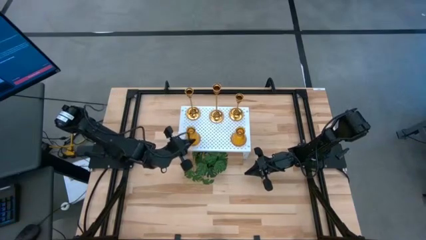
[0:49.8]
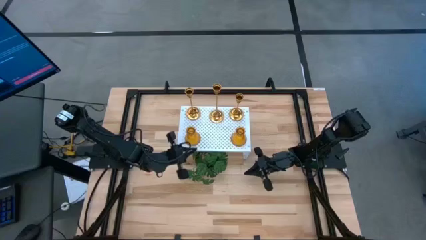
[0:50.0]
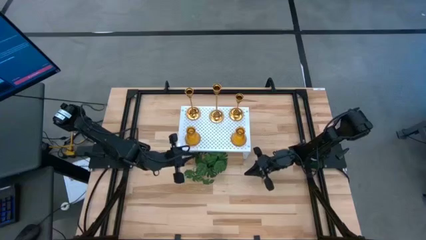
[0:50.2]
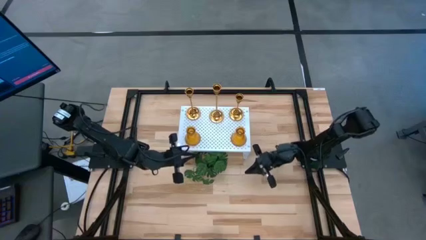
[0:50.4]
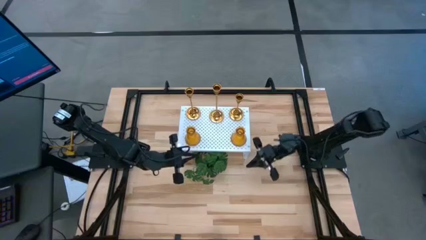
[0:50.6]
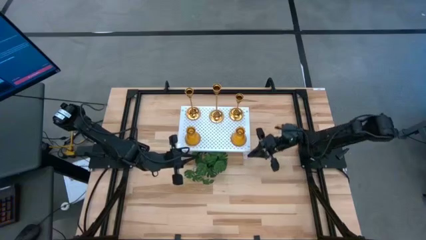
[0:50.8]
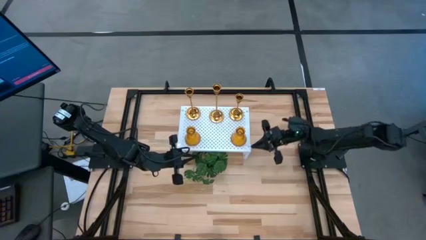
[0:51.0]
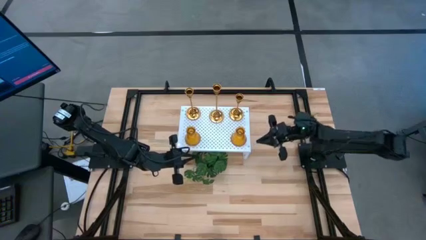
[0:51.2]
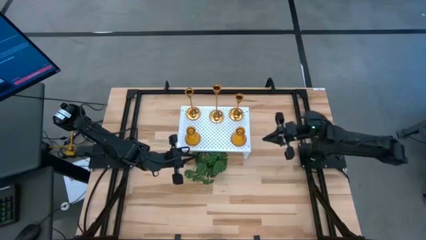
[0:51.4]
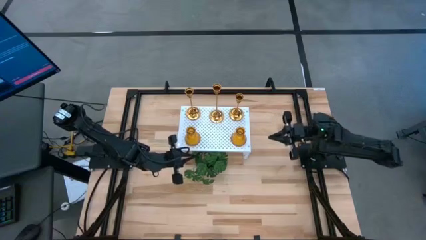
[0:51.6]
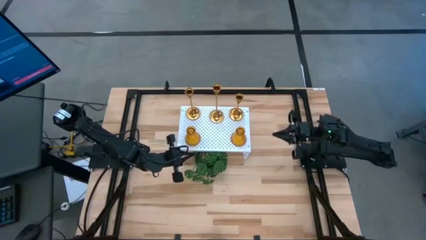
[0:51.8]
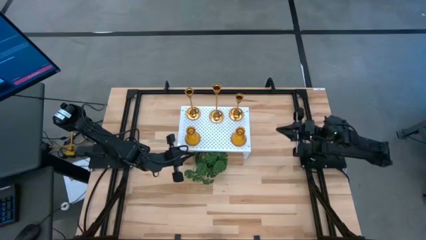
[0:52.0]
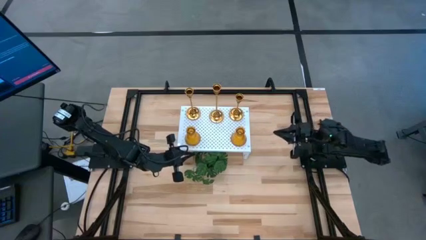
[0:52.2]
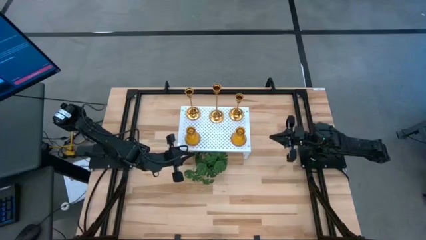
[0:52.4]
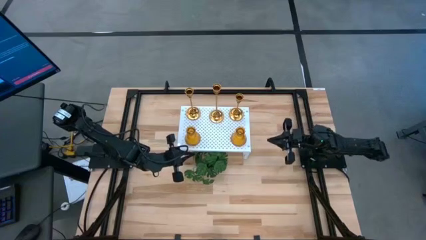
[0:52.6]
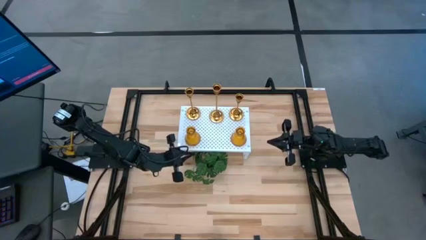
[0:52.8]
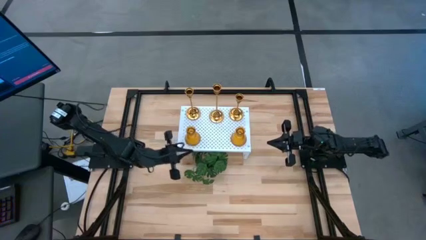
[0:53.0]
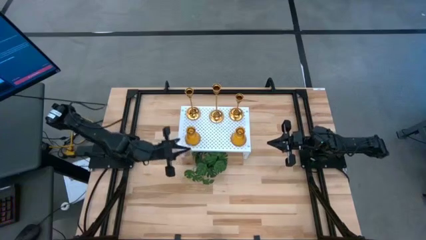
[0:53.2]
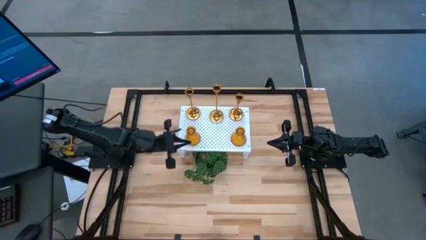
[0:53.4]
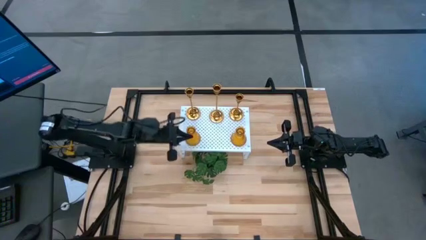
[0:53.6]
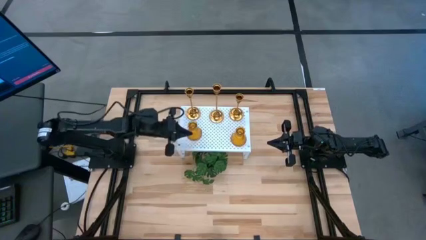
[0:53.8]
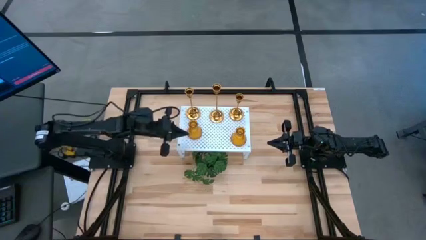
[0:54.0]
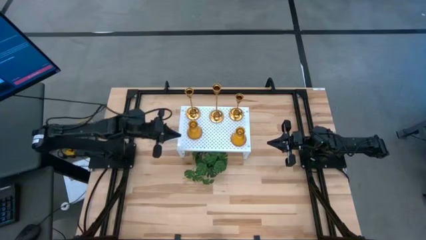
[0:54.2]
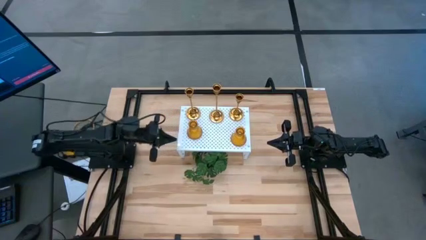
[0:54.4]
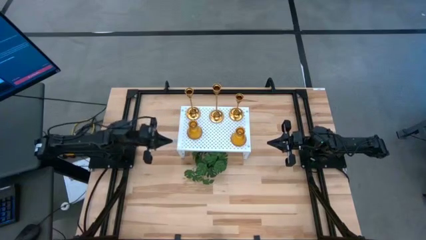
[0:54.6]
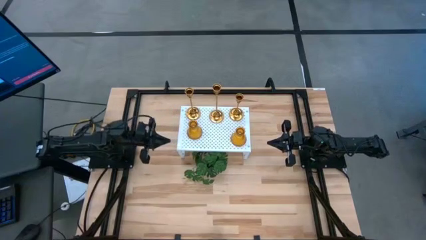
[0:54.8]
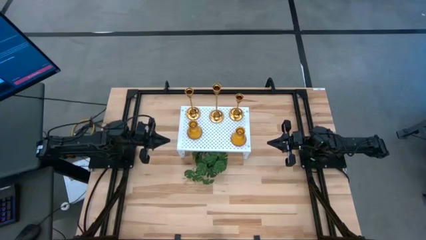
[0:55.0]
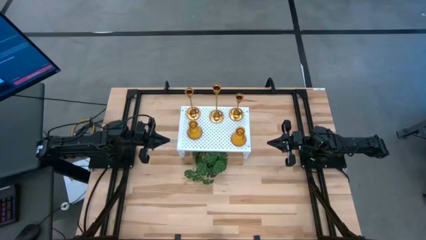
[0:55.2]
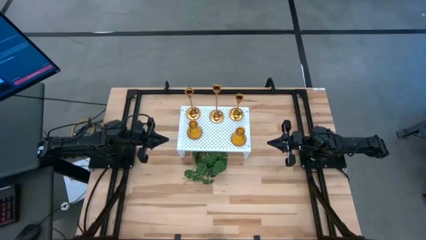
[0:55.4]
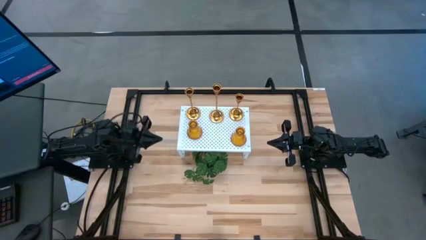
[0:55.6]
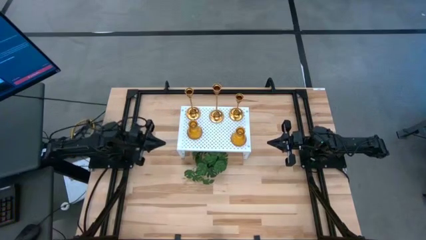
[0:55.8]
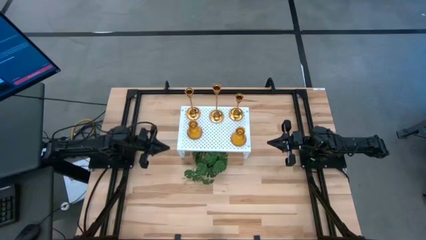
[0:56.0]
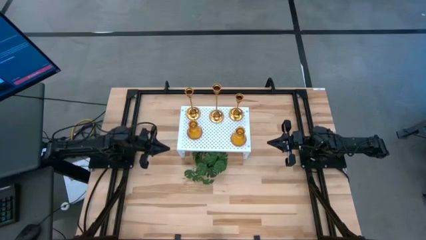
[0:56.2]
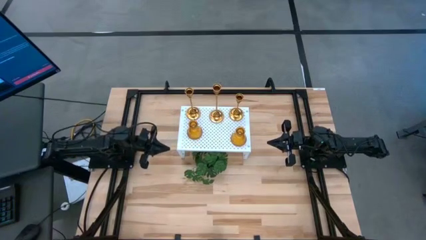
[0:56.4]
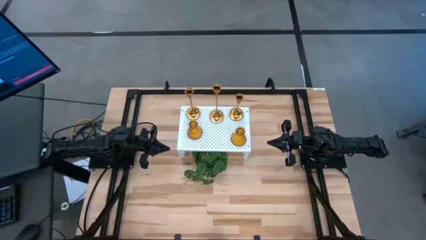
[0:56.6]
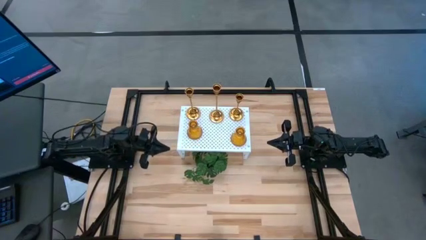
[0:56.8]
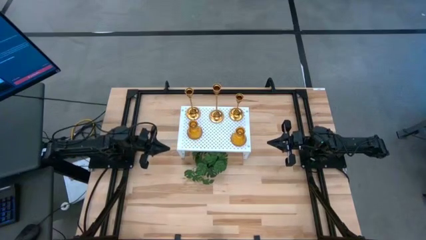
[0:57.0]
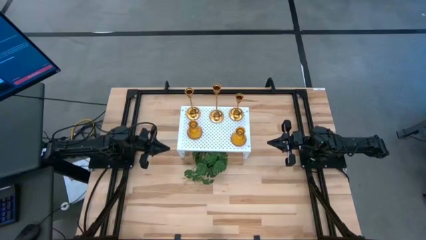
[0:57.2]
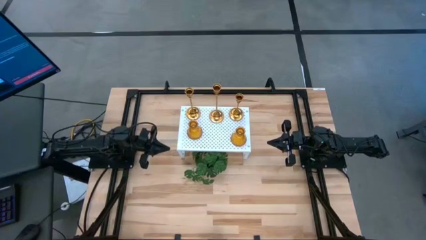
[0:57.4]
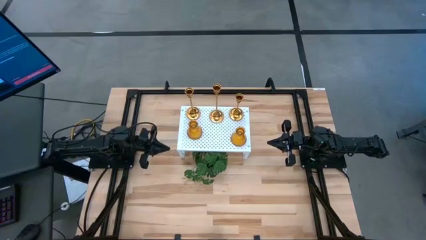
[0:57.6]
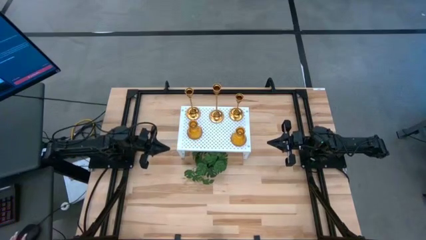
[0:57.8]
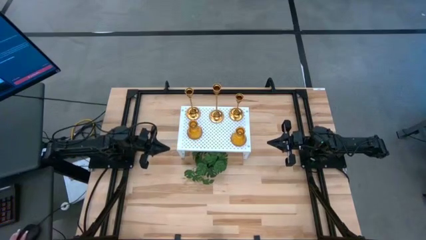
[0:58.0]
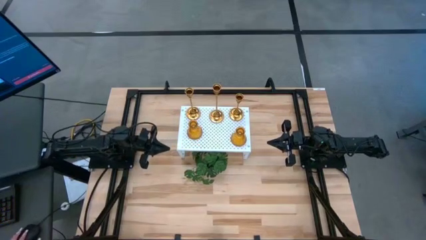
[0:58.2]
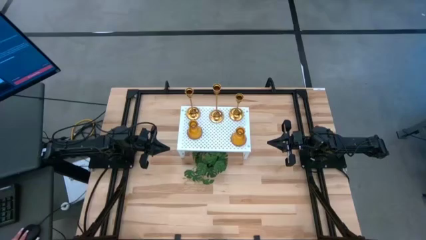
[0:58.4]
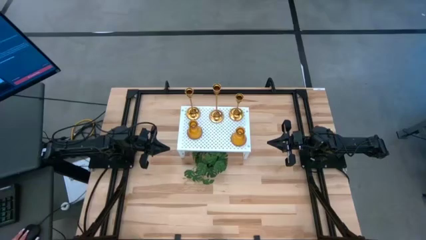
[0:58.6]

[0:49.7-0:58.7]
Task: Pick & Place candle stick holders
Return to Home Position

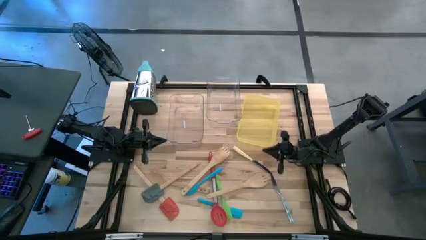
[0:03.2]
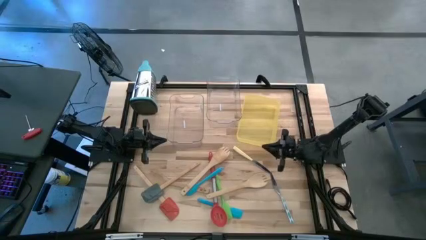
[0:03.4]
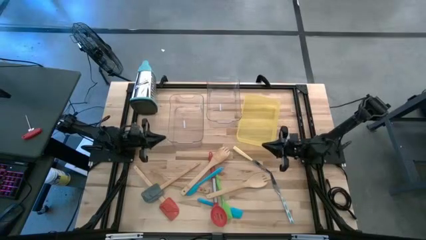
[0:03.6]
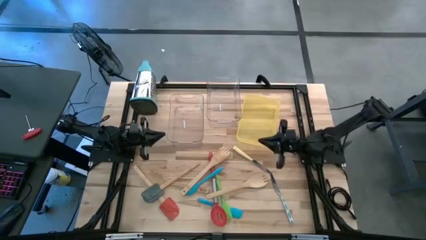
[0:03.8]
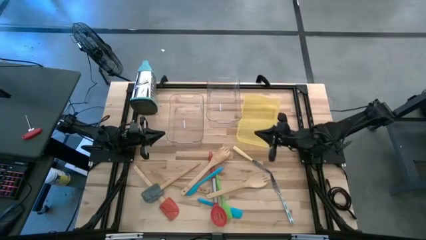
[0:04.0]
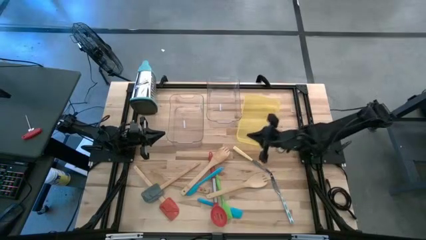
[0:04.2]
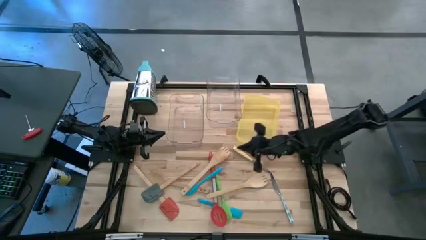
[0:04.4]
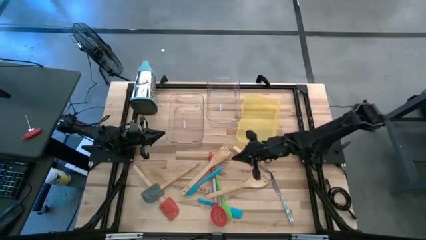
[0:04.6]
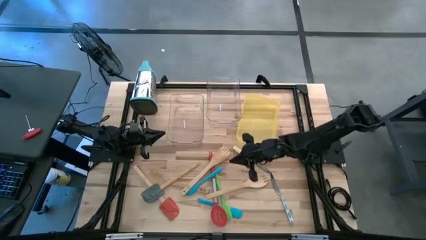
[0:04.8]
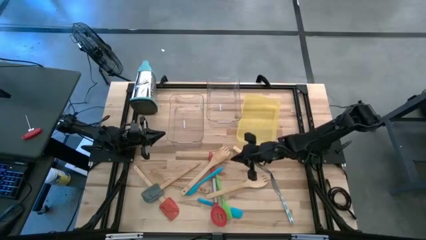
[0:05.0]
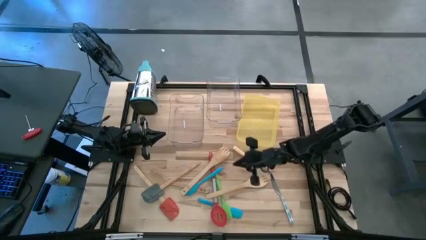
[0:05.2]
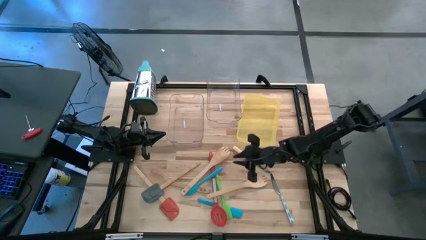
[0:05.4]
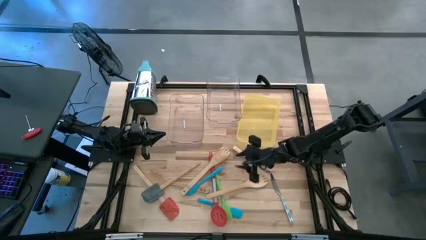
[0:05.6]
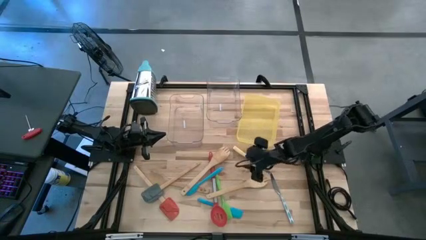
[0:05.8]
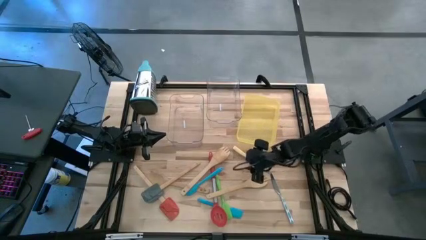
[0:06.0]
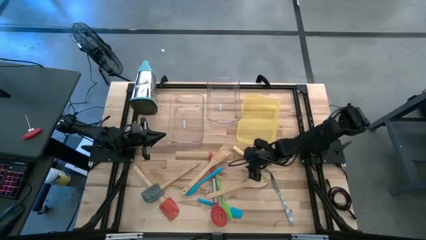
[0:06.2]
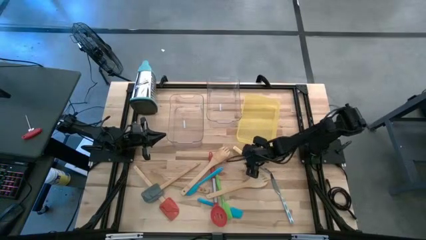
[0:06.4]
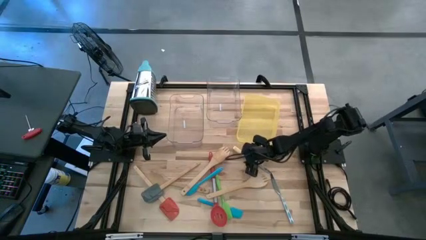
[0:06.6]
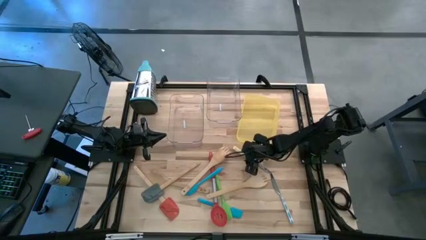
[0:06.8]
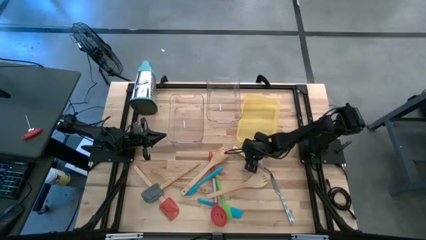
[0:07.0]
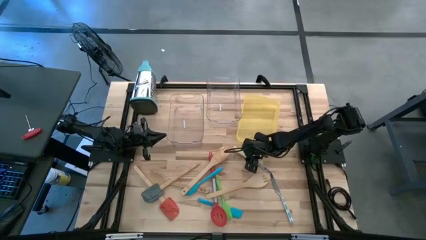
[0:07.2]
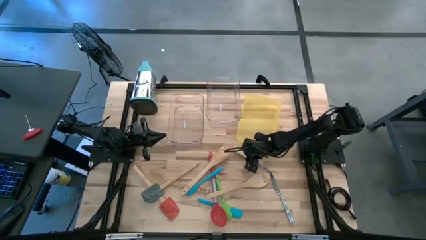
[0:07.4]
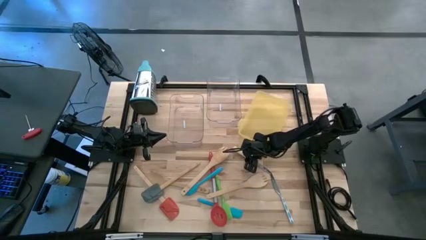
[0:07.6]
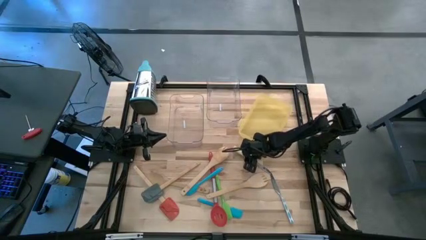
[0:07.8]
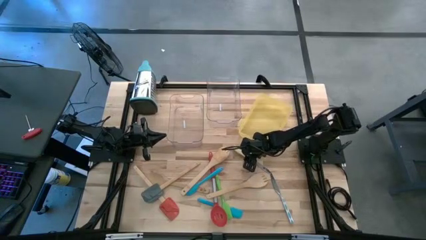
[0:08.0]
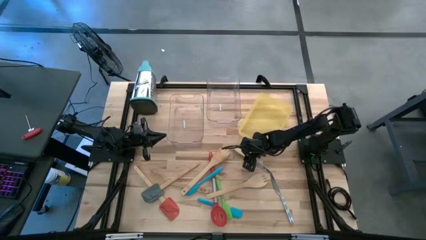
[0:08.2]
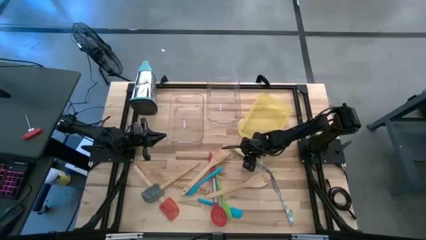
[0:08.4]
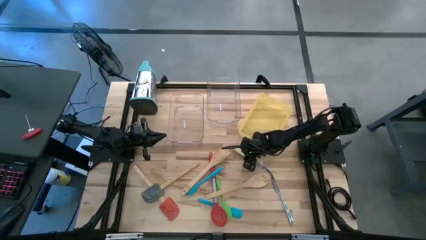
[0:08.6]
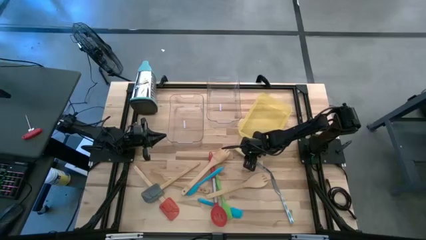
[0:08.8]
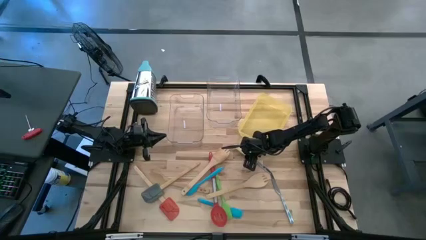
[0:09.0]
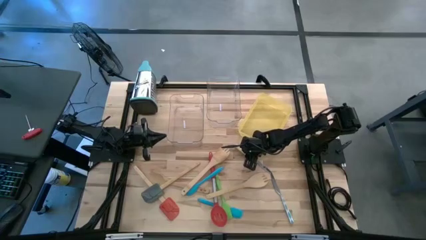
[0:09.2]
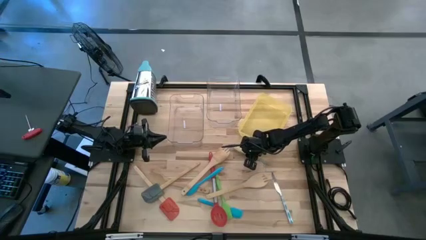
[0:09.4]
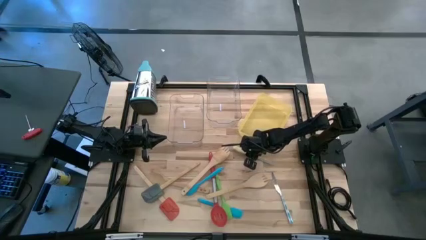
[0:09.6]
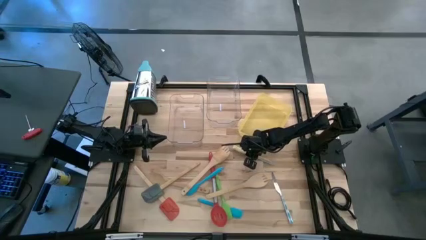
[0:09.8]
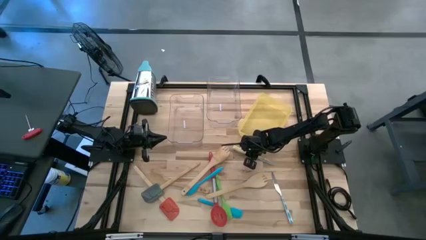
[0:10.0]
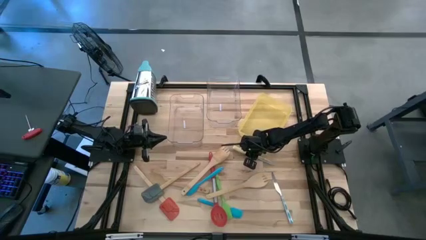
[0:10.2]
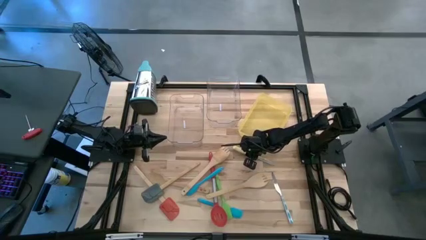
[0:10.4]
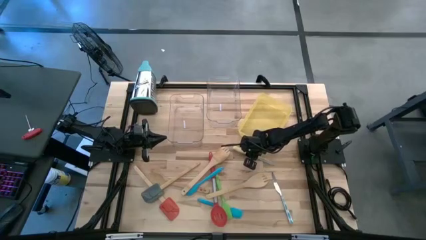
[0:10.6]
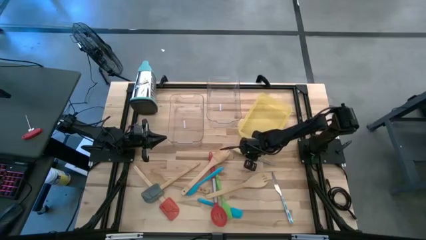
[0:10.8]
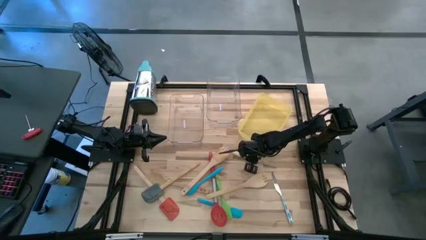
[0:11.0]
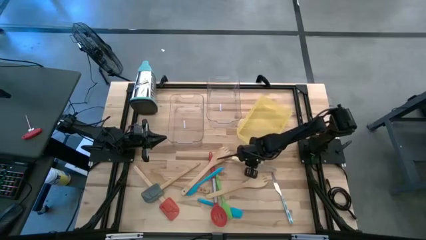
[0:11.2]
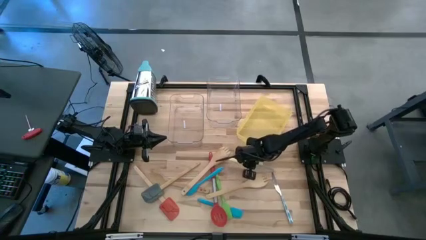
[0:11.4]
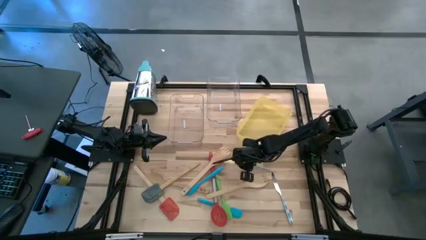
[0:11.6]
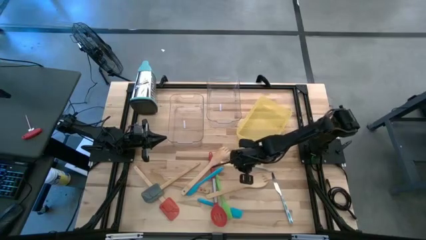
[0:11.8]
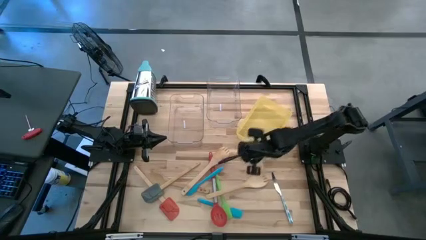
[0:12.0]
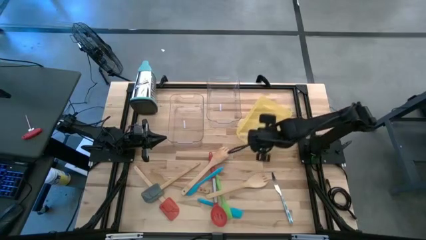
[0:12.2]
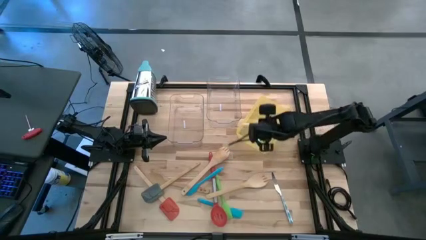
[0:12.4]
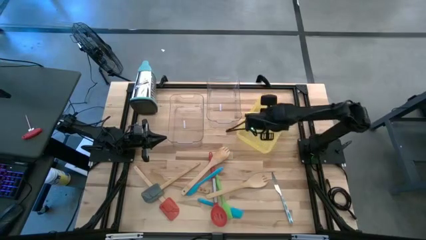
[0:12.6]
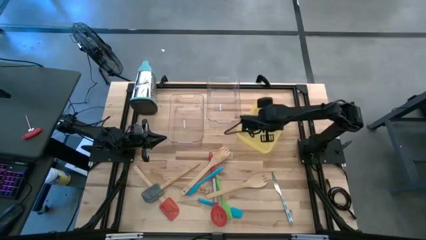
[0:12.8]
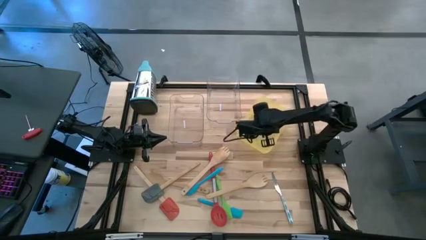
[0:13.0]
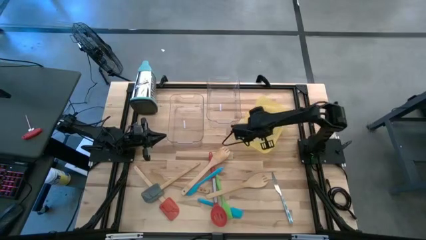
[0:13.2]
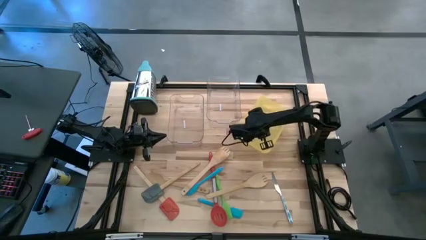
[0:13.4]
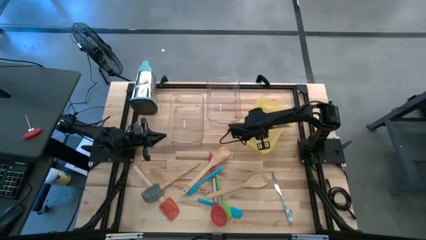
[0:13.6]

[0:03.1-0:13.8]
Task: Pick & Place Kitchen Items
Put the green kitchen knife into the yellow bin
